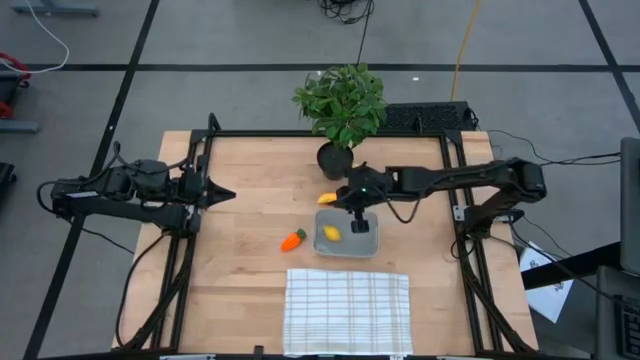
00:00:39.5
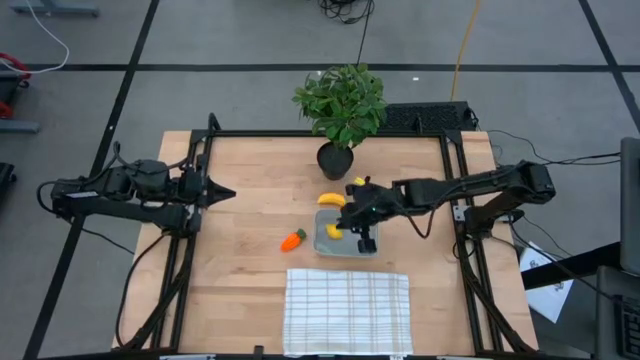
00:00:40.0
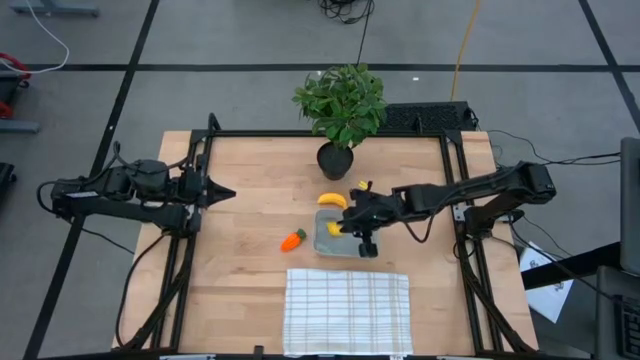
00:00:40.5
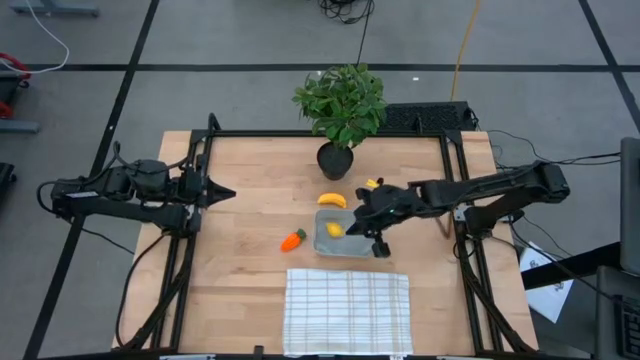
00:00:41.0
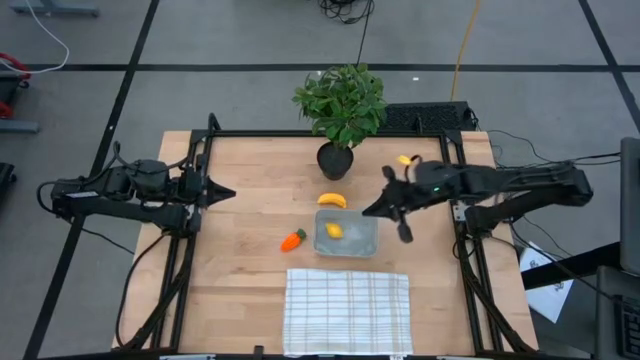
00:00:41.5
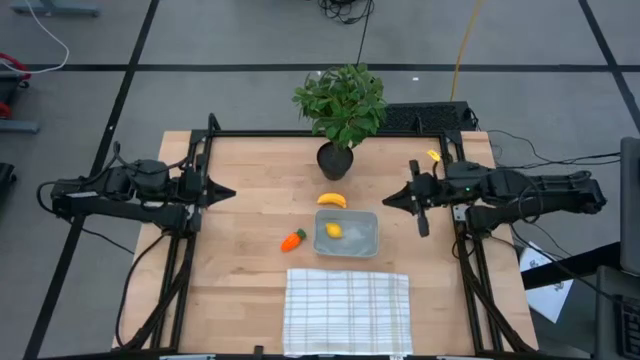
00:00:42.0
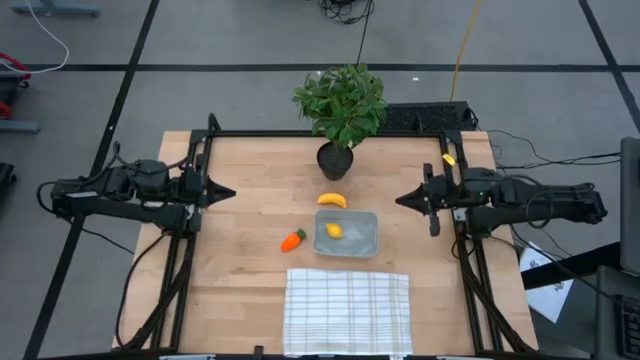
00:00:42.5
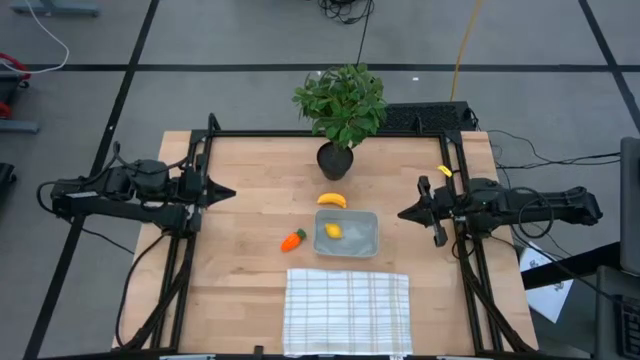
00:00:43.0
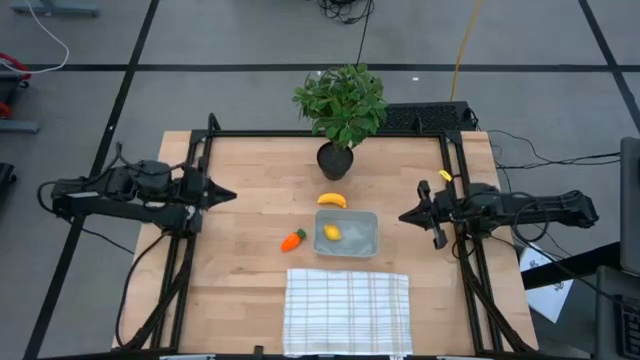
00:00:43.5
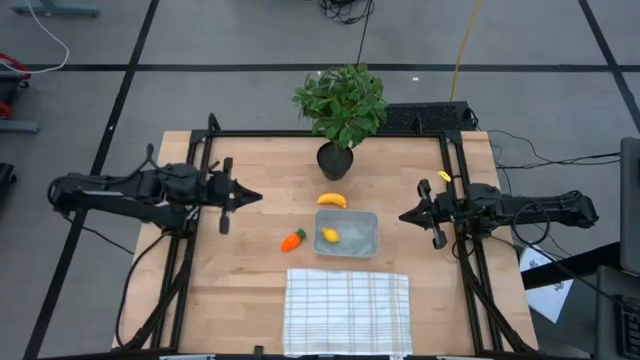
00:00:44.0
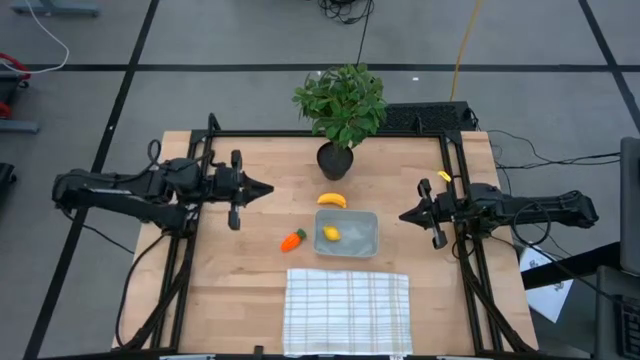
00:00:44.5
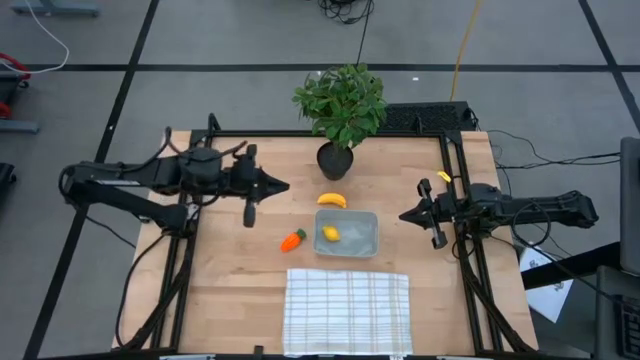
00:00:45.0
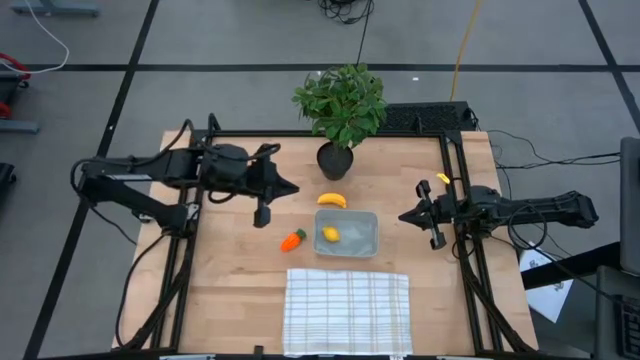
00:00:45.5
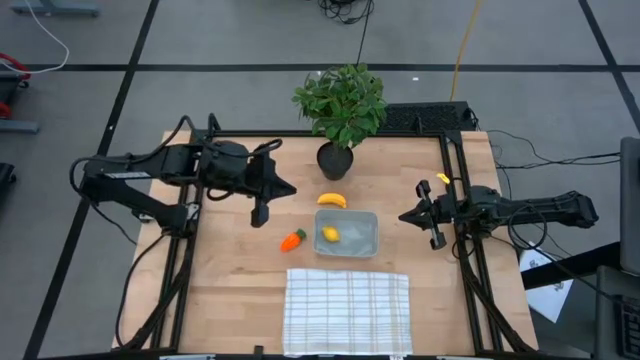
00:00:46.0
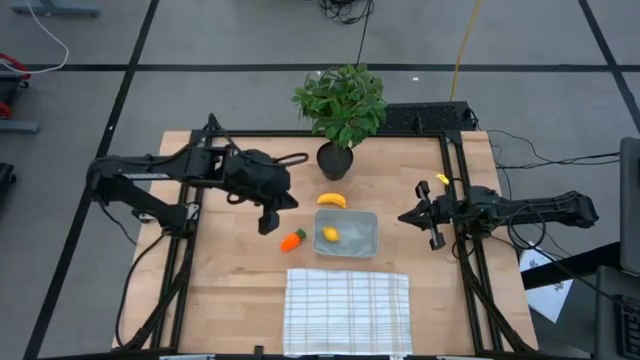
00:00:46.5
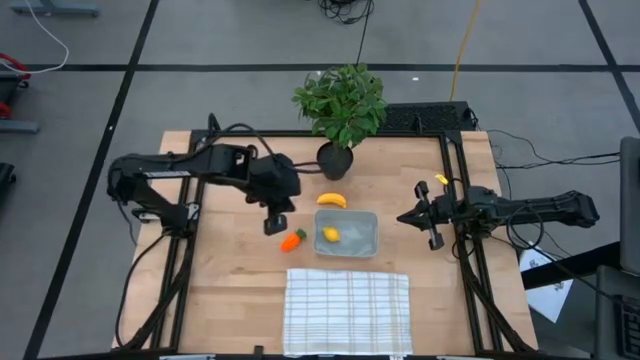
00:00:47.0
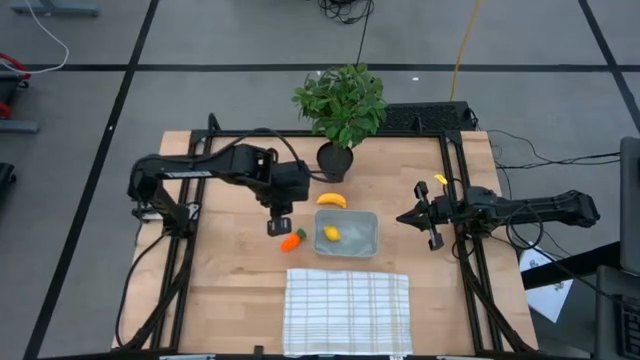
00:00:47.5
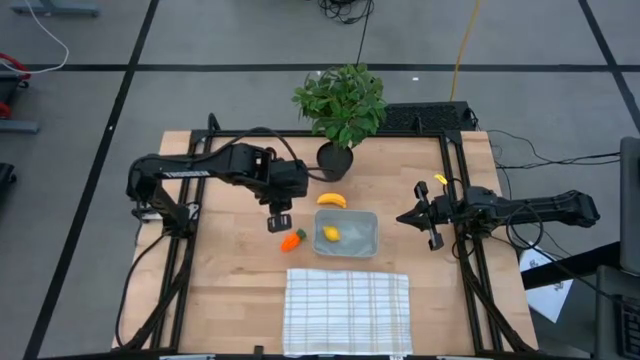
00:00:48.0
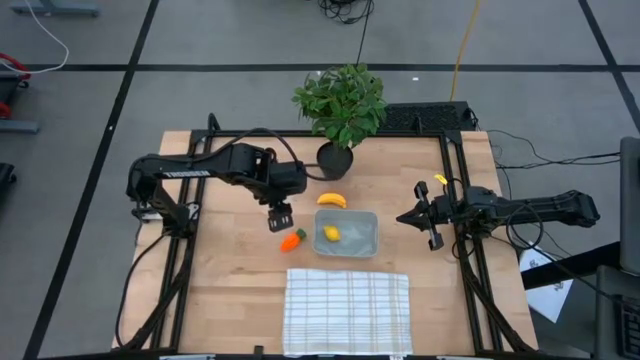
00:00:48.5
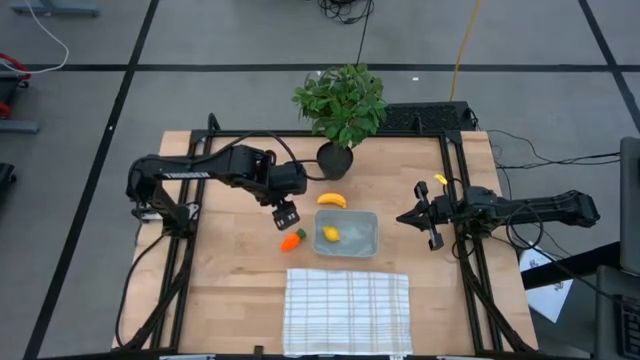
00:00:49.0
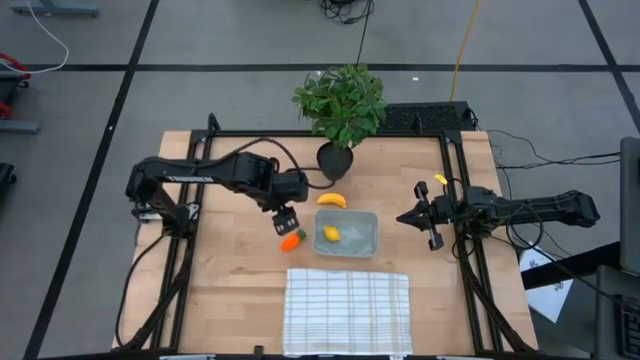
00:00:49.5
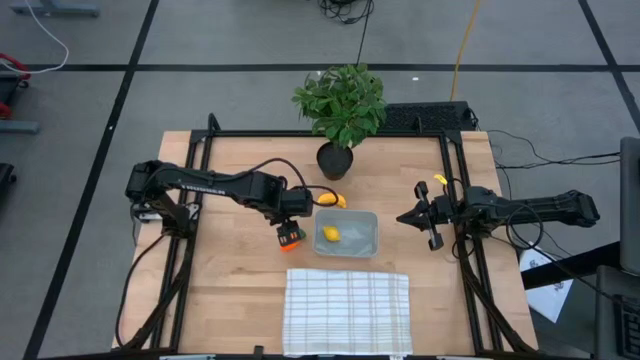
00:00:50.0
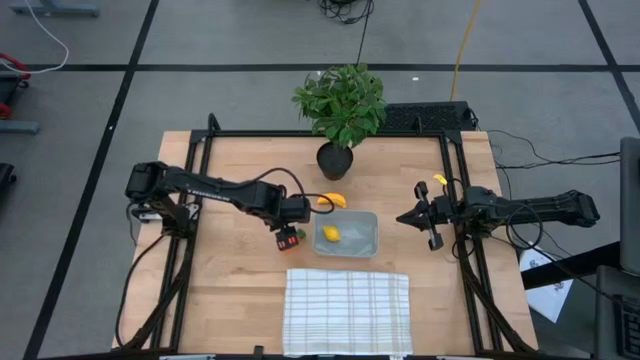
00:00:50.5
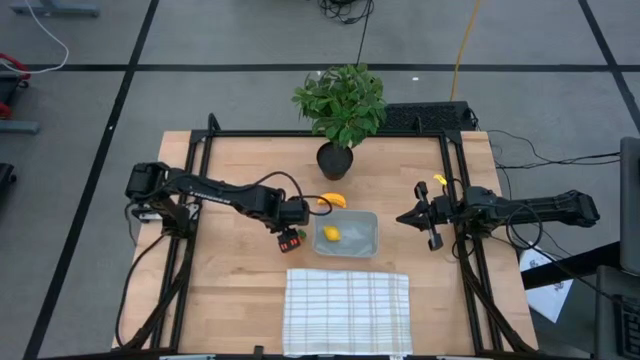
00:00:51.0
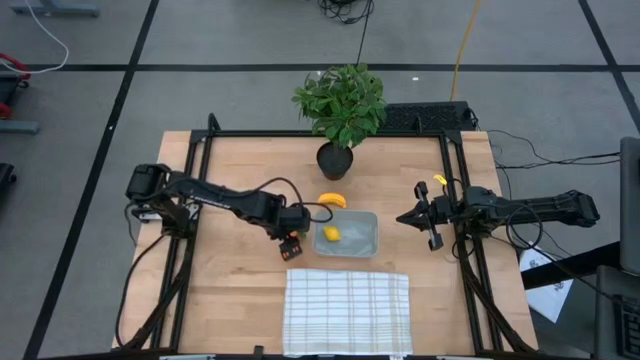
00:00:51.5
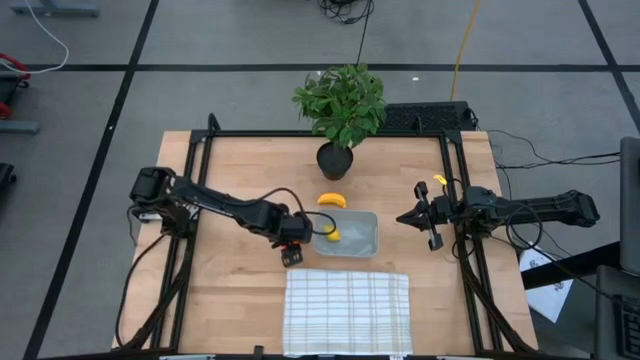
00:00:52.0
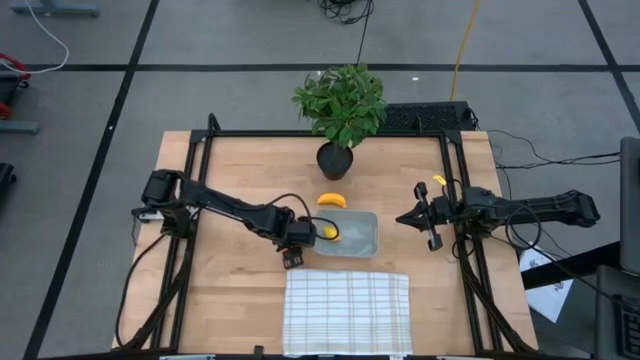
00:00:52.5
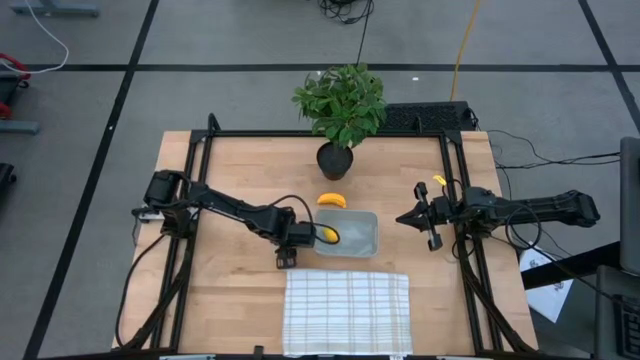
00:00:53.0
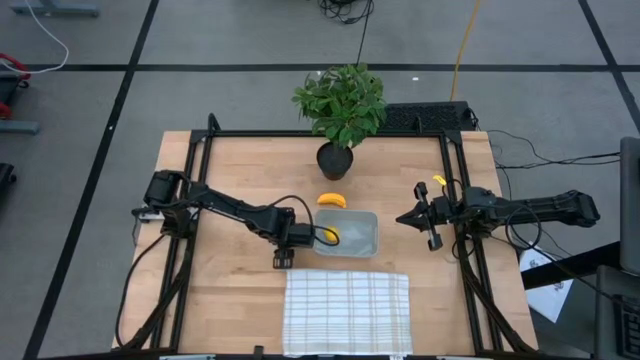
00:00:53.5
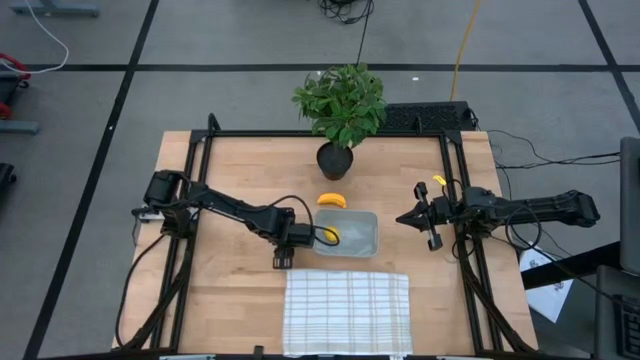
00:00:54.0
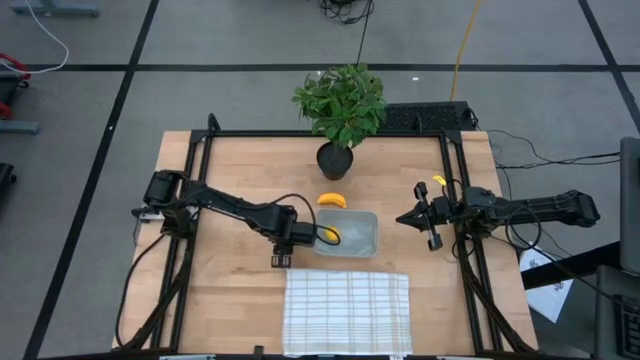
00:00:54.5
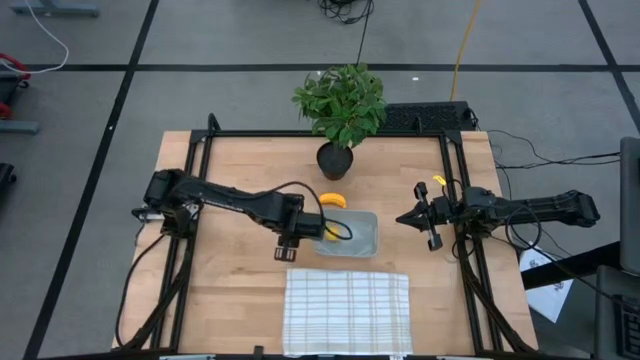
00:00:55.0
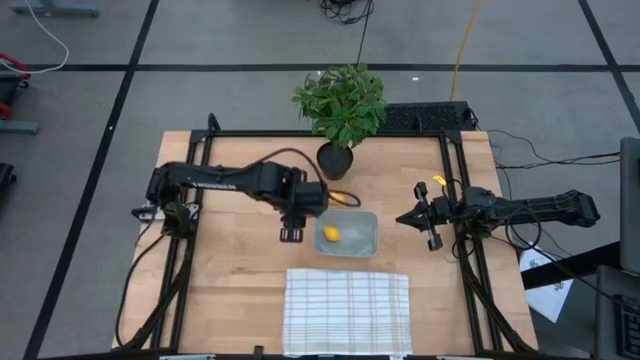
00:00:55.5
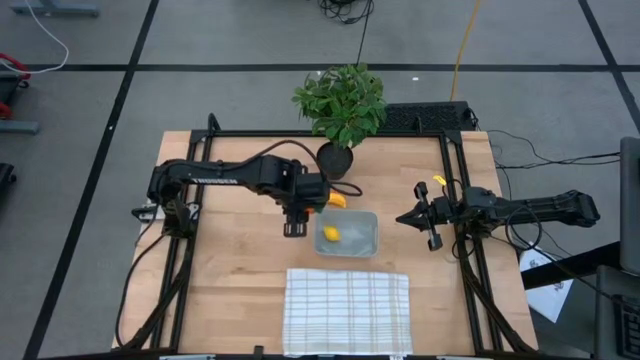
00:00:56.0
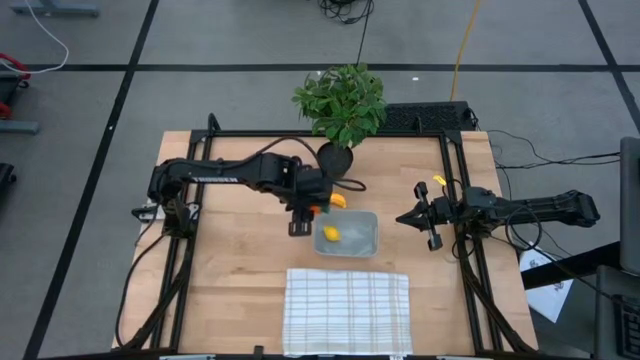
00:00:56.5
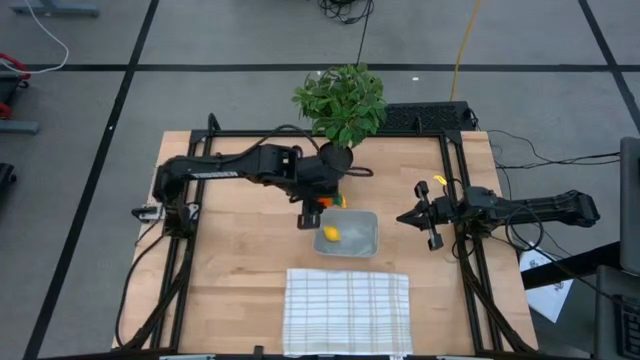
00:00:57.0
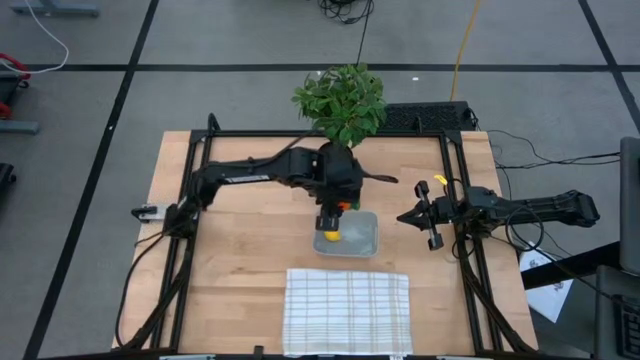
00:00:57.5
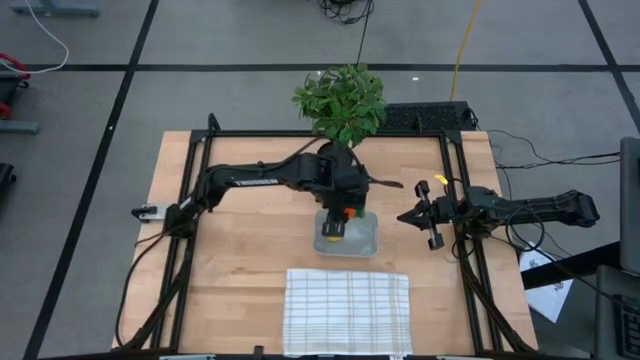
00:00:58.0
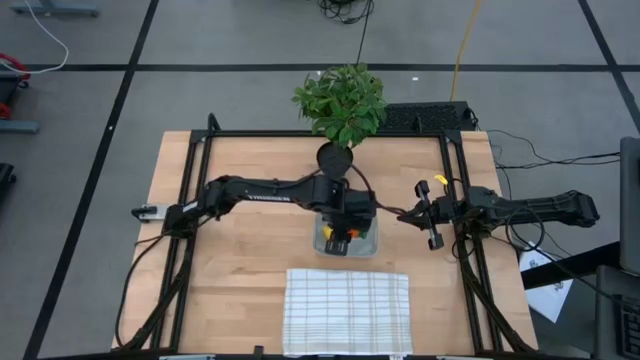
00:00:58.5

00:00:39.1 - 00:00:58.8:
Task: Pick and placing Produce into tupperware
Put the orange carrot into the gray bin
